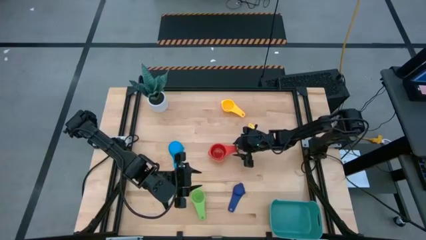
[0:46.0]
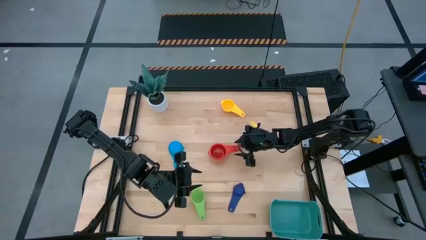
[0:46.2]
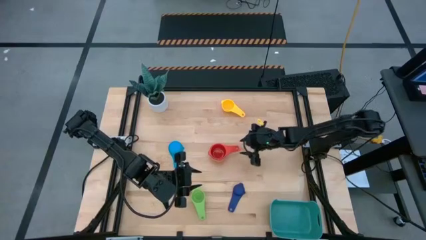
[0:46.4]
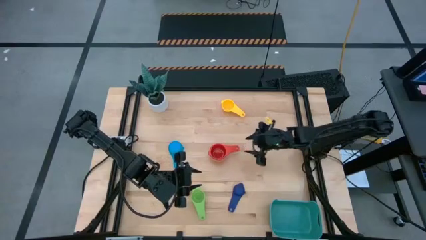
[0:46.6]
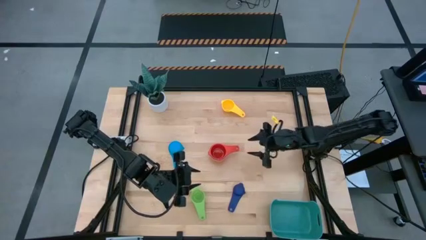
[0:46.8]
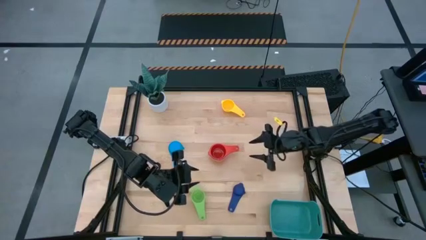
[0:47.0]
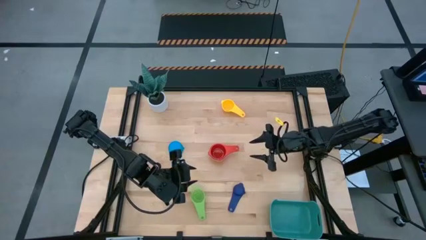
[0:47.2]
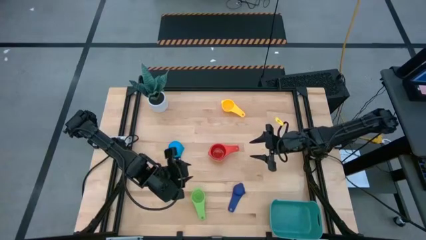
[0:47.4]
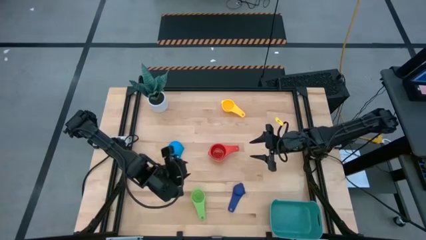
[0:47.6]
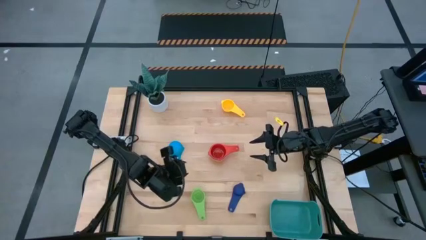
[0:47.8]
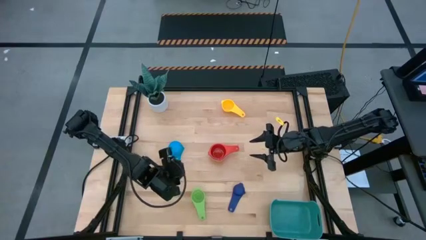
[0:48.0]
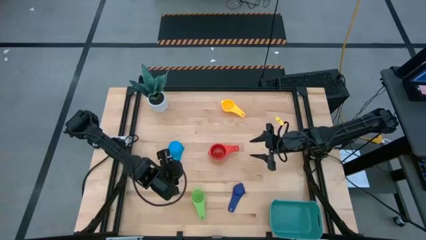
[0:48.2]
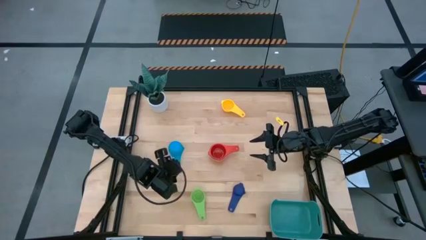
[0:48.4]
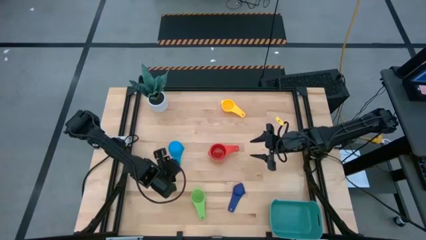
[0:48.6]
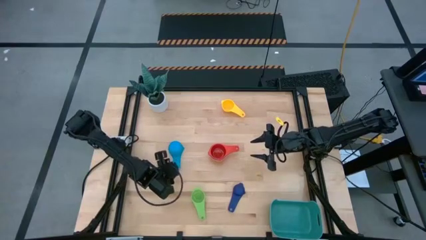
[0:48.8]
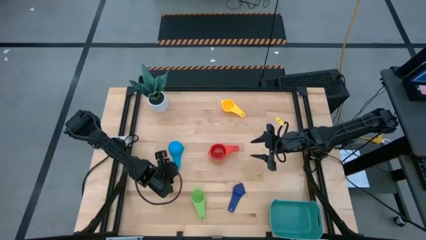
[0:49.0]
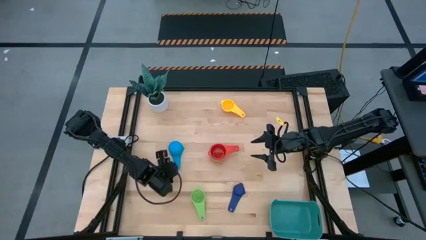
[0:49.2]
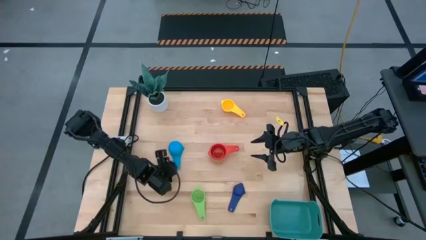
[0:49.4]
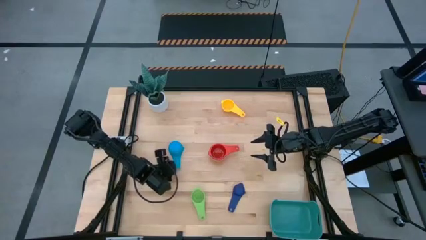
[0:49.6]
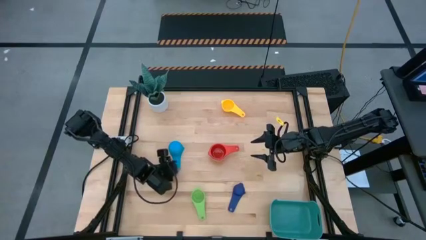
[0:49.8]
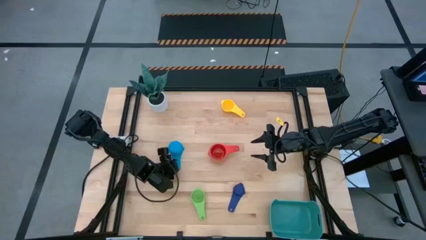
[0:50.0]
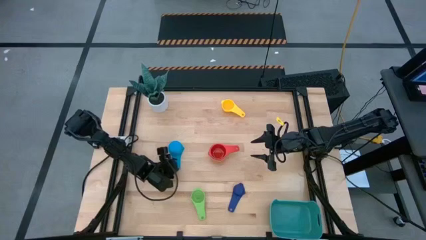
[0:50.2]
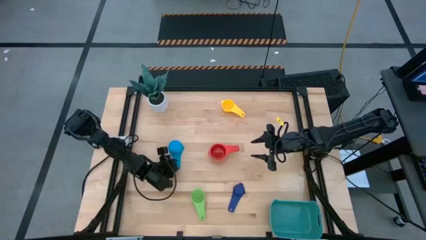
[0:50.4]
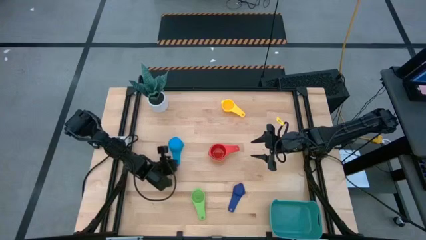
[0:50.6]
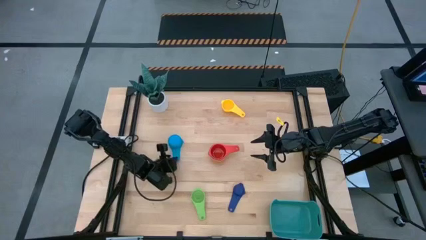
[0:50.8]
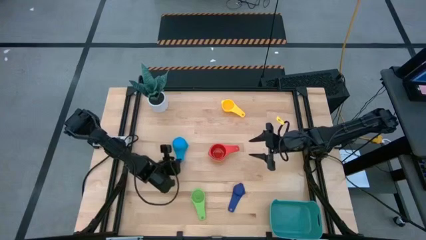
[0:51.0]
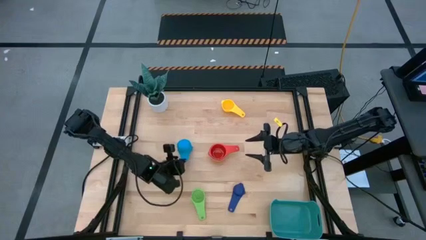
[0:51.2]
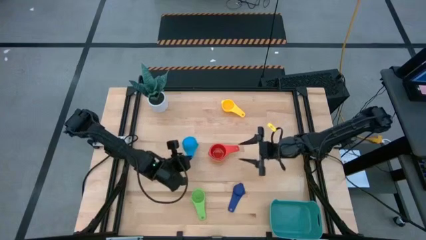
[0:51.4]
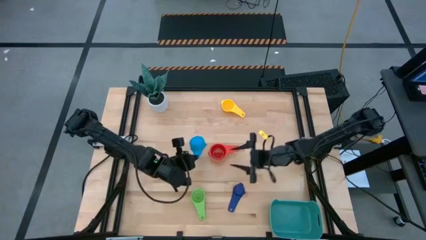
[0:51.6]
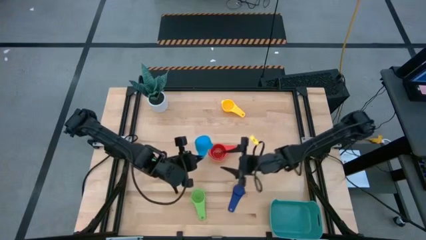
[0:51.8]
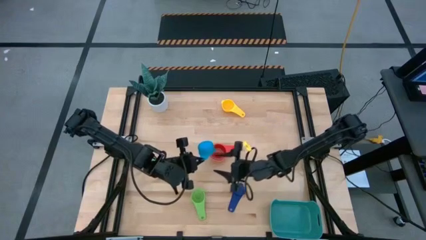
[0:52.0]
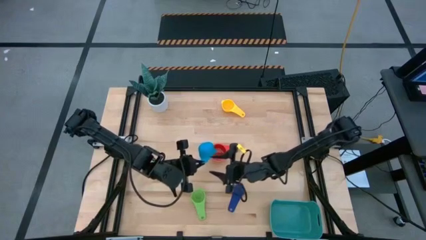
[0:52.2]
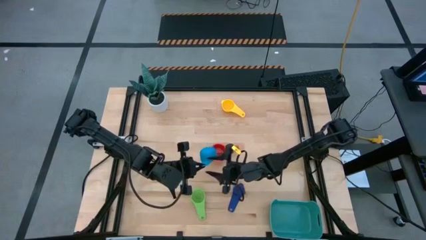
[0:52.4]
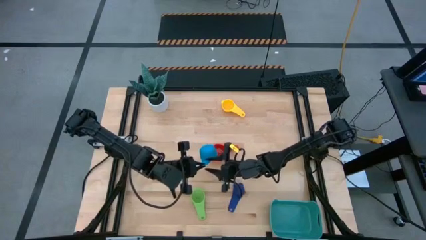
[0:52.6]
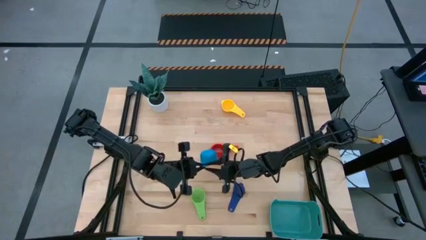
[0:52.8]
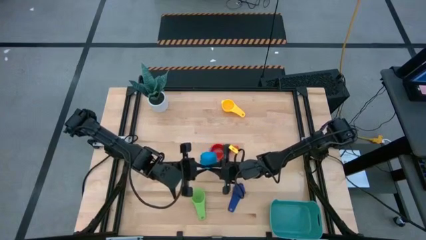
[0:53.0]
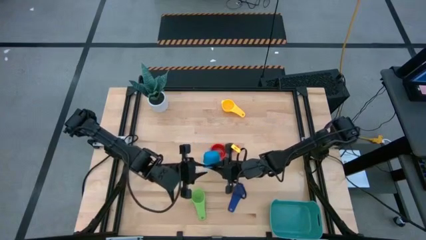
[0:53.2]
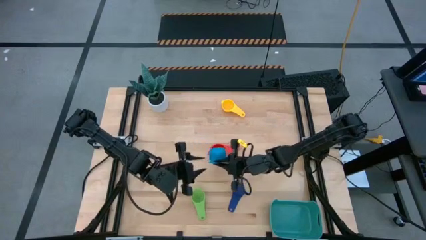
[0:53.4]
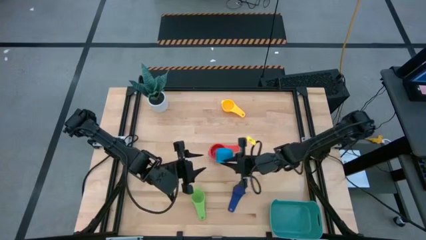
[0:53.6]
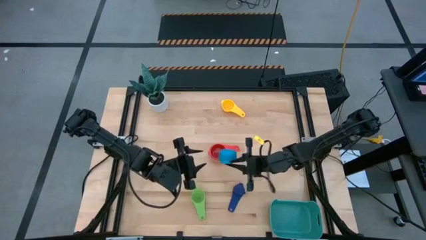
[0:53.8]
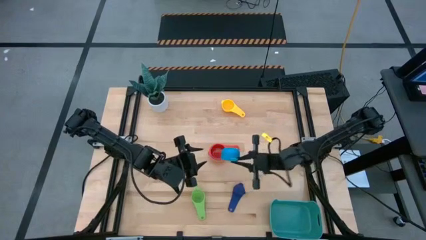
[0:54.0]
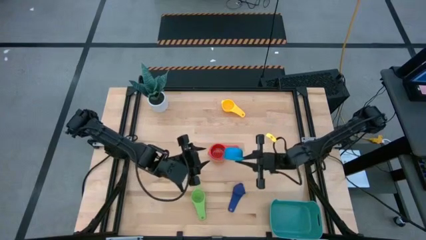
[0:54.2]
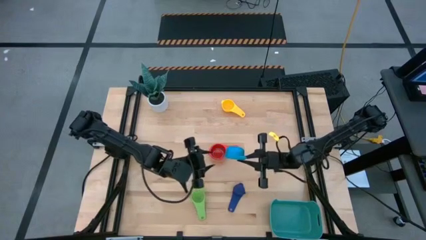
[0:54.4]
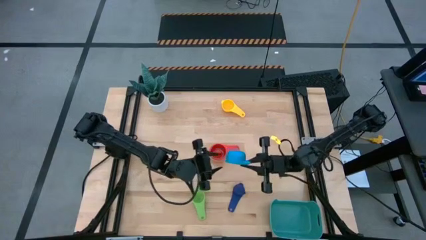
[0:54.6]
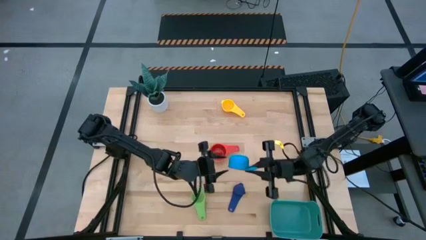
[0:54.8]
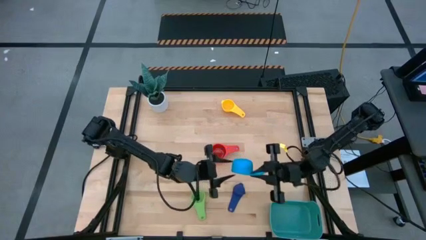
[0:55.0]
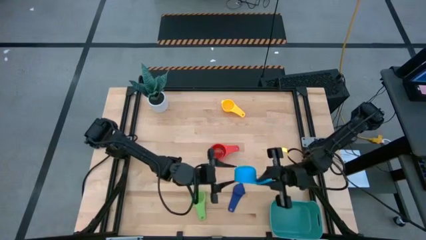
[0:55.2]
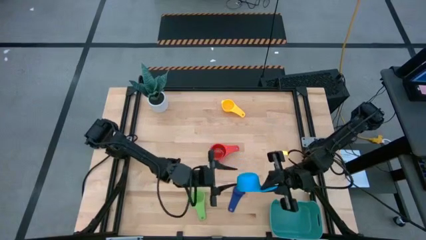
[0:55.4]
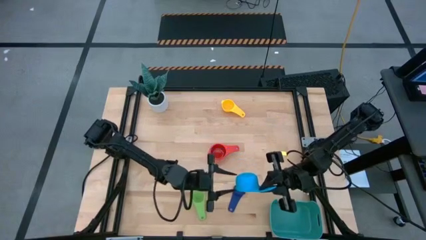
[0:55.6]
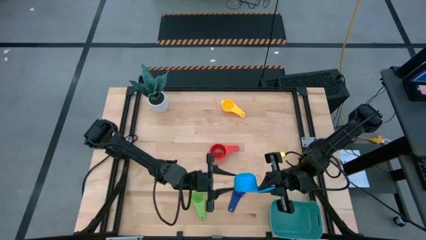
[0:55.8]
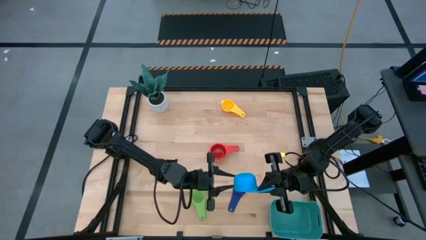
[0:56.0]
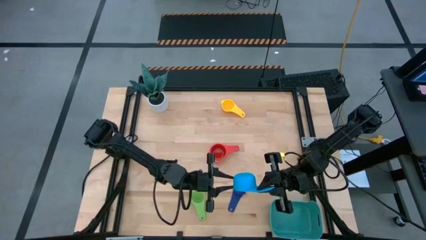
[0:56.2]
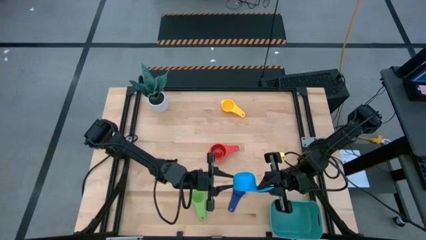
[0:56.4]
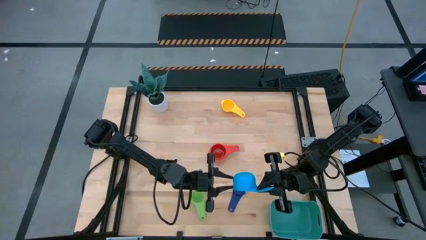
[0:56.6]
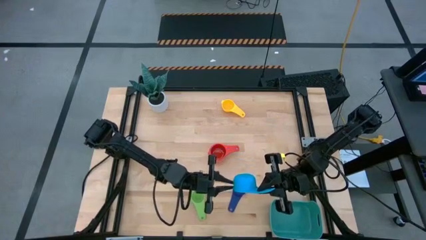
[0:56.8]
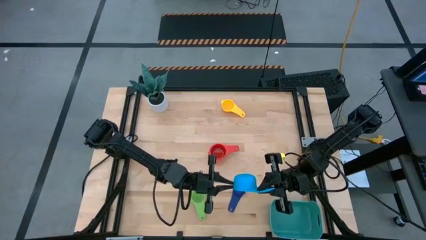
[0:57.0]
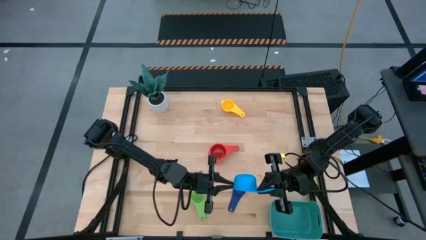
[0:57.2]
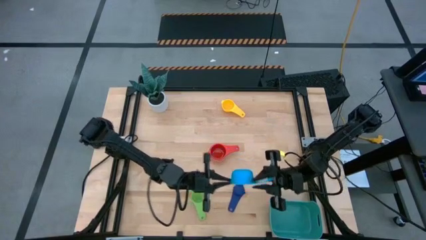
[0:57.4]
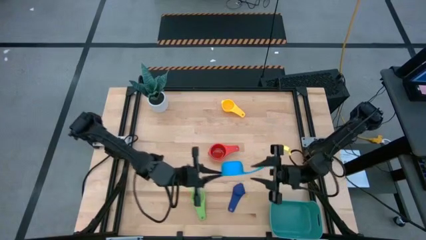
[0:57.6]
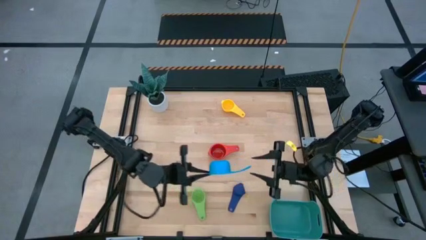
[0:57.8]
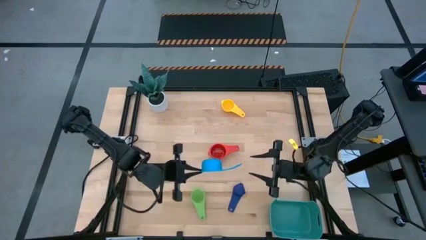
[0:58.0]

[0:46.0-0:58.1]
Task: Nest measuring cups in basket
Stack the light blue measuring cup on top of the orange measuring cup
